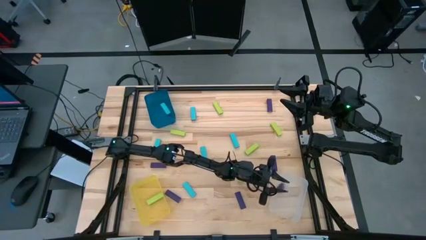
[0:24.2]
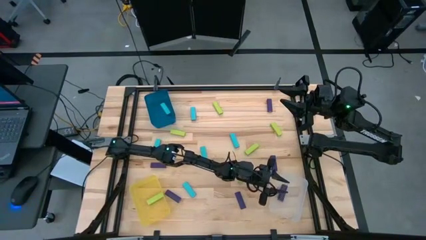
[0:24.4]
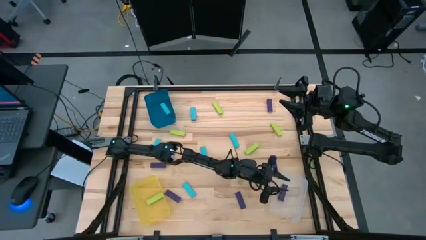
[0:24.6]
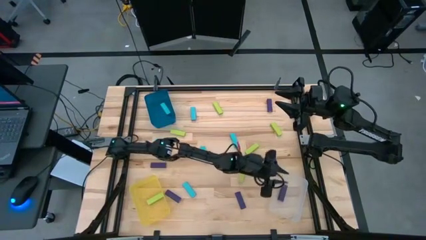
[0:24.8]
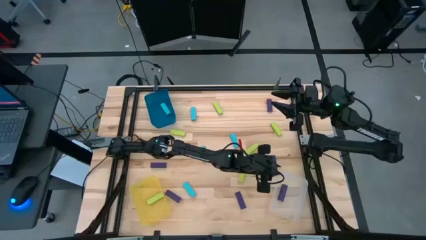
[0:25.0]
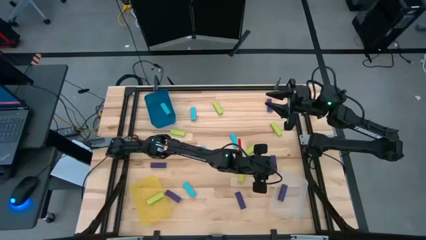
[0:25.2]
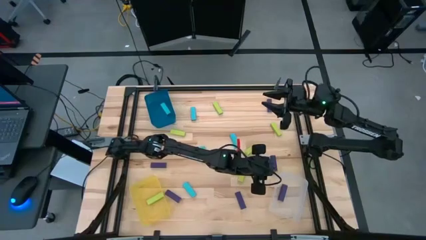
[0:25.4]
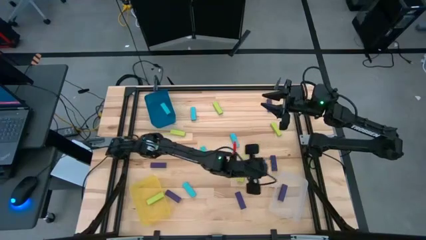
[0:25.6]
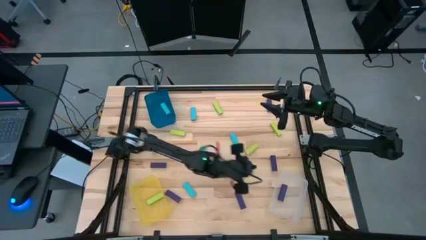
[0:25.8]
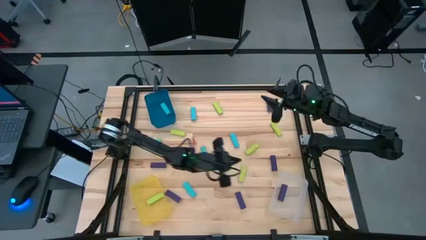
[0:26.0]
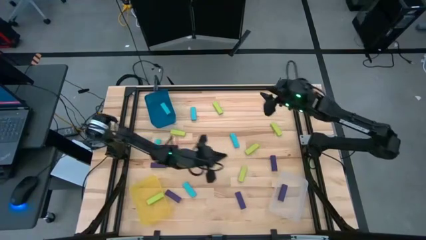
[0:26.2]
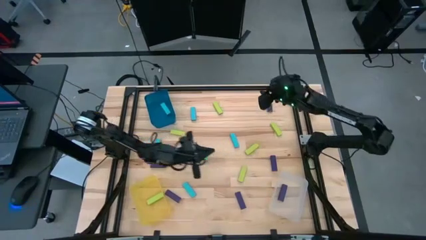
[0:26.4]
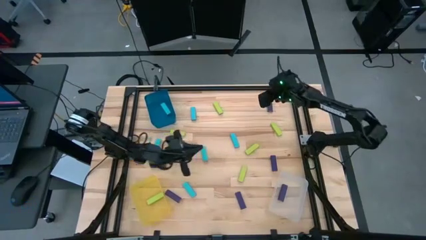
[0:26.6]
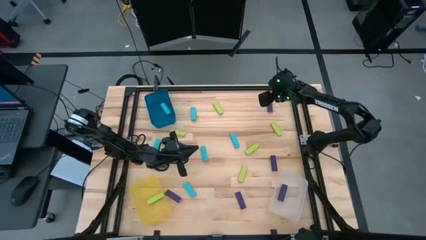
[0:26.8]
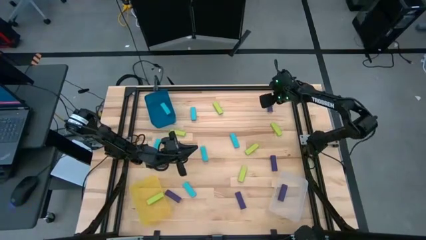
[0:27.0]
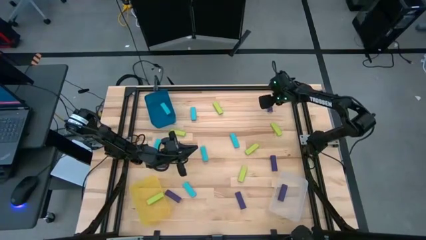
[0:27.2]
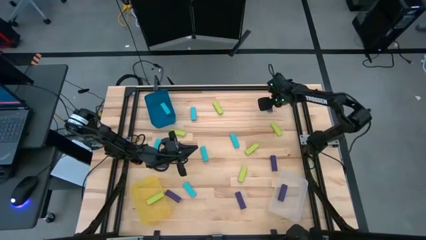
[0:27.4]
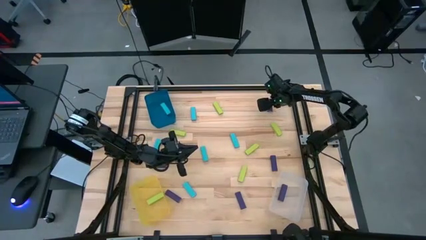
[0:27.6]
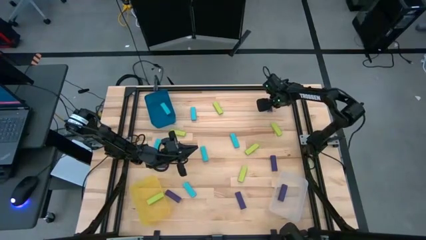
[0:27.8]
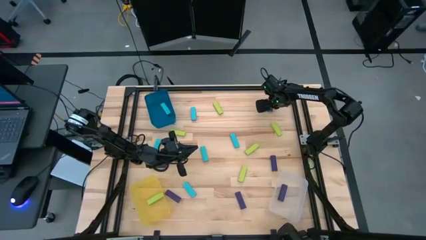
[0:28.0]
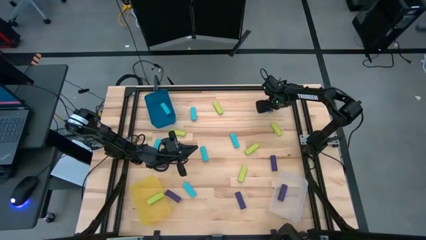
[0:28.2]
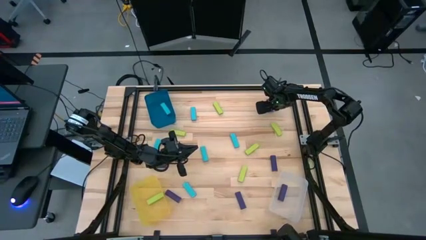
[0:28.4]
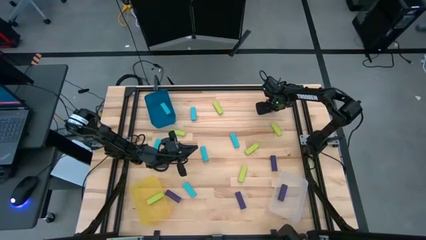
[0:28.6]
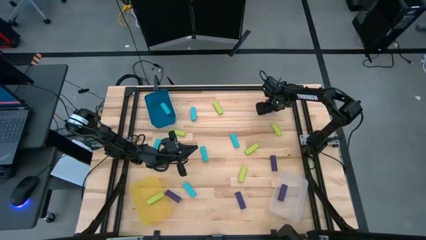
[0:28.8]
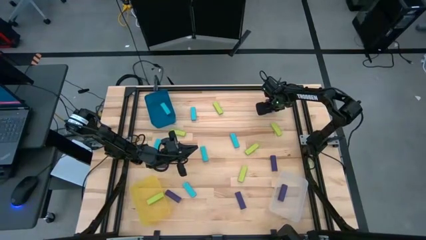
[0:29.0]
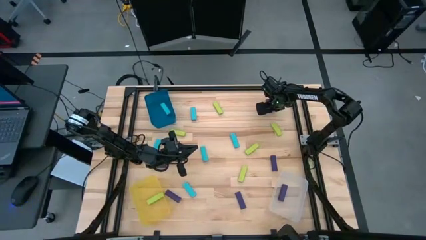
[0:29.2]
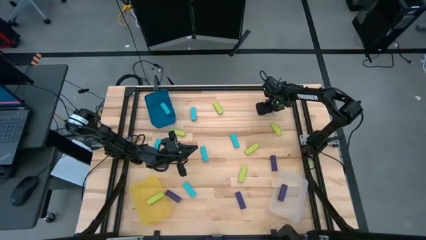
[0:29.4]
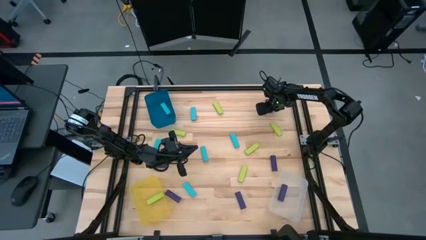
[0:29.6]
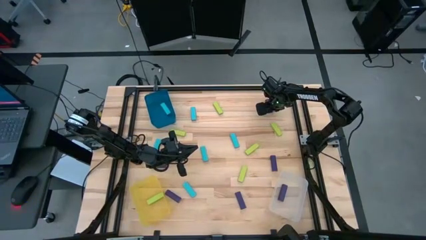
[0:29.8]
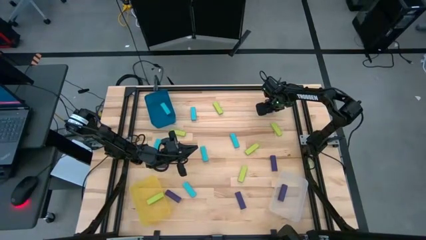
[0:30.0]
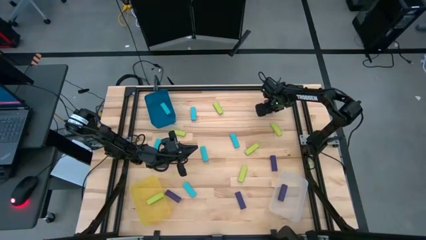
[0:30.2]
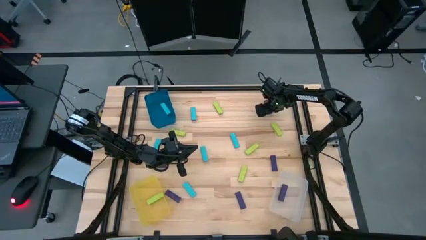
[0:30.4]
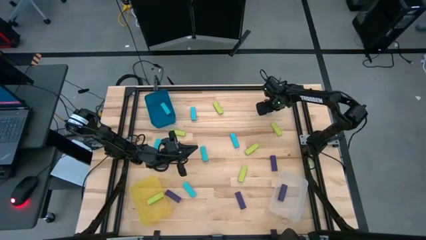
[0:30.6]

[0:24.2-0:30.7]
Task: Sort blocks
Put the purple block into the transparent bin

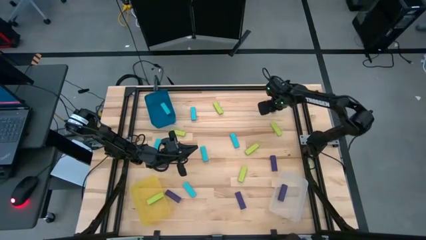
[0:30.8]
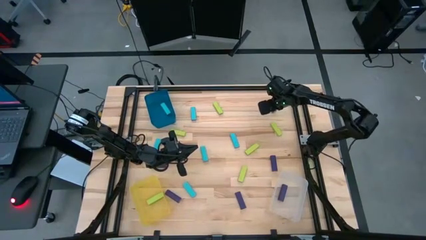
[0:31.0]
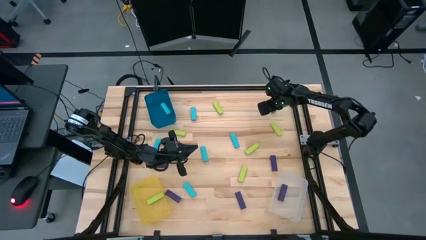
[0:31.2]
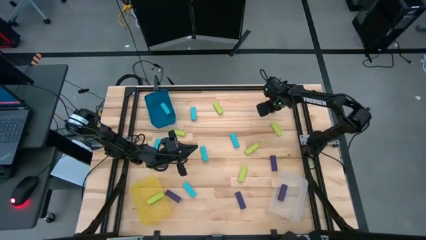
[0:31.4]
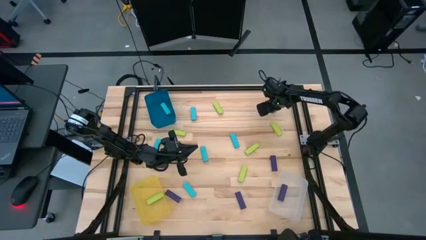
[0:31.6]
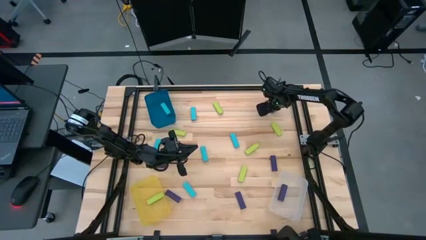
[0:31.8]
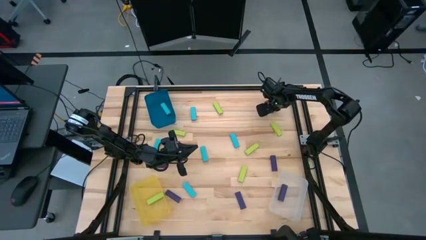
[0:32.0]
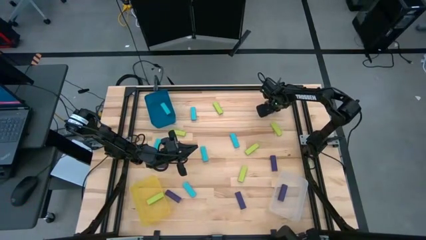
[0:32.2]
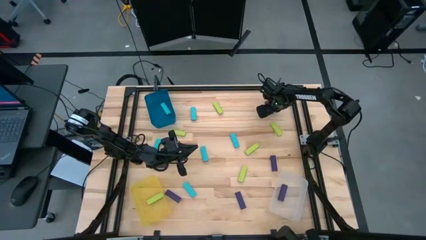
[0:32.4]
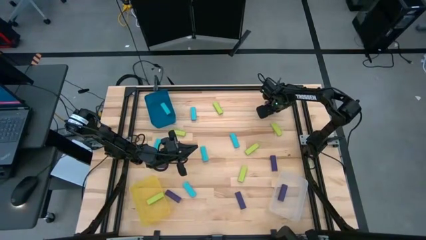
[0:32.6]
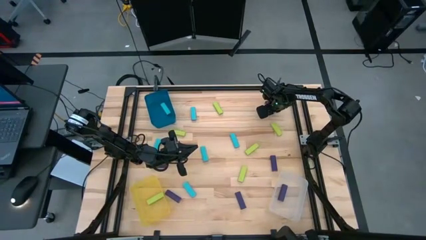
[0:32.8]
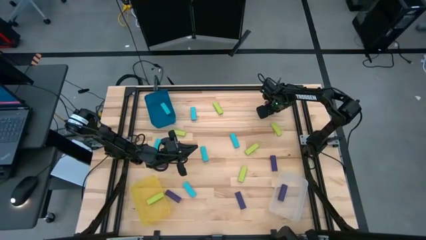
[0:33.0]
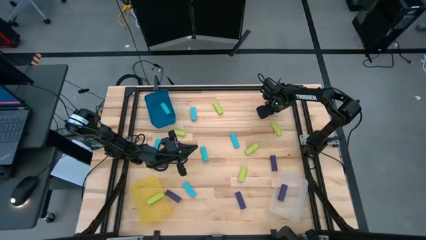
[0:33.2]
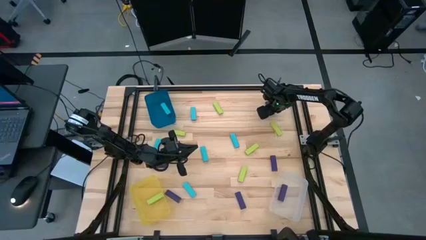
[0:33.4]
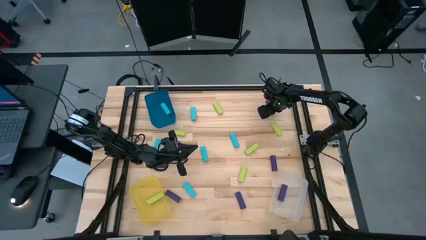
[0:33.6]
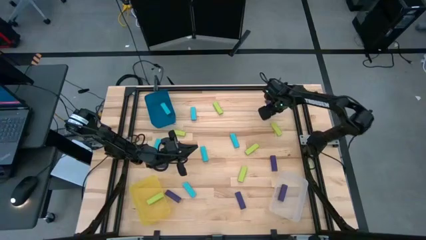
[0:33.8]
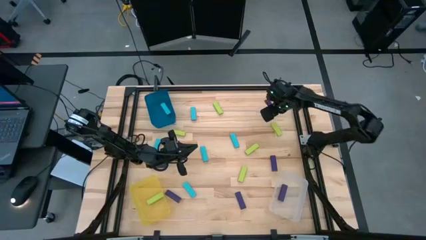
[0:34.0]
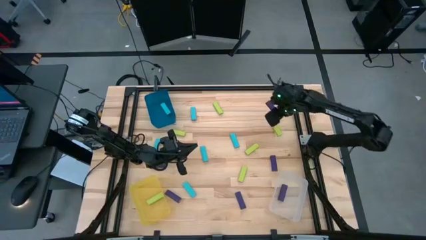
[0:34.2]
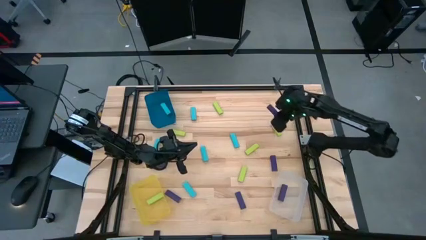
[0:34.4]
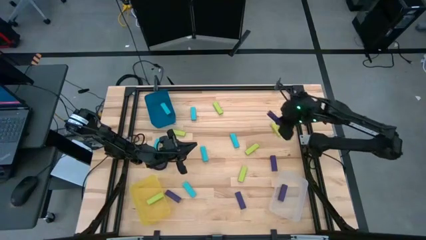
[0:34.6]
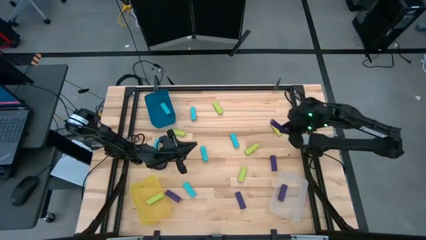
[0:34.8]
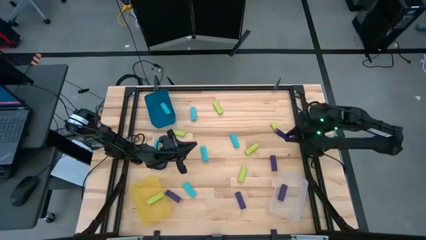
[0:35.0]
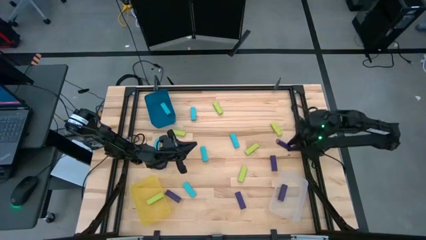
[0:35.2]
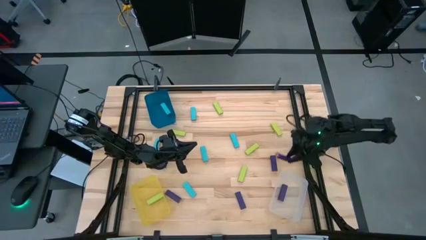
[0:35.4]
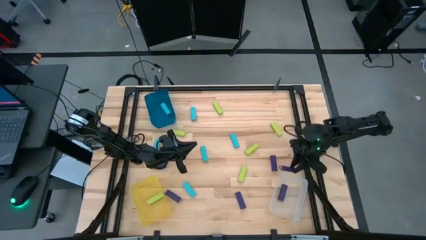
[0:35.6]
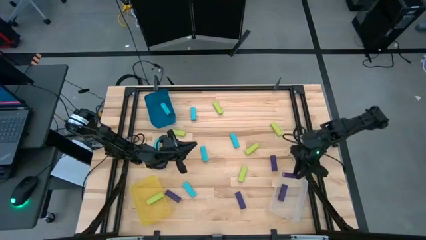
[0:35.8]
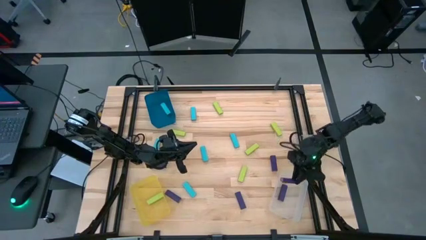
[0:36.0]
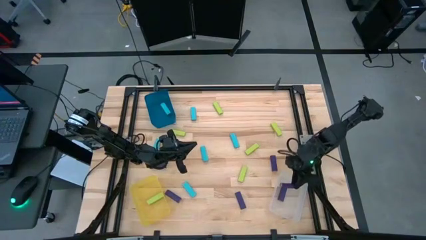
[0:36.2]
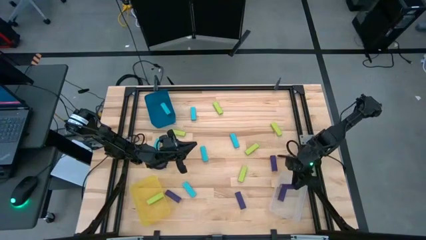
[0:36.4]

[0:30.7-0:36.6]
Put the purple block into the transparent bin

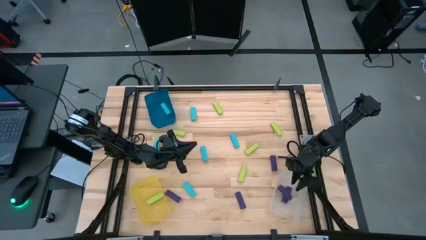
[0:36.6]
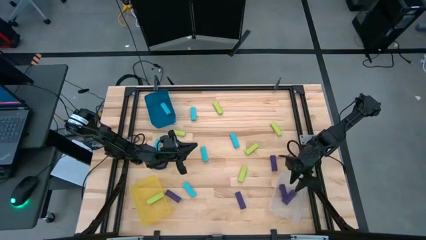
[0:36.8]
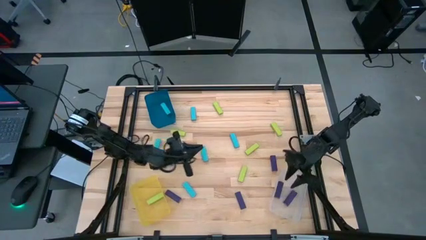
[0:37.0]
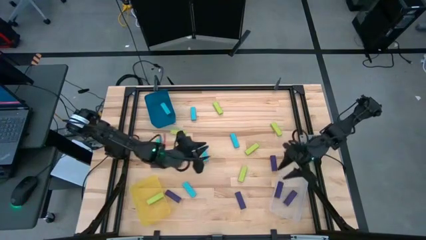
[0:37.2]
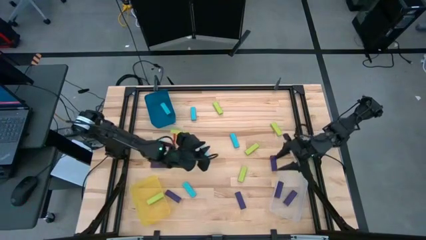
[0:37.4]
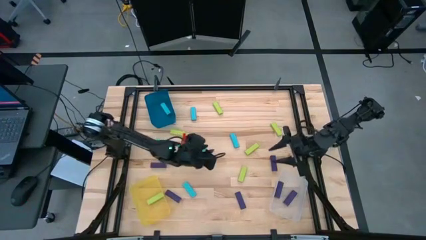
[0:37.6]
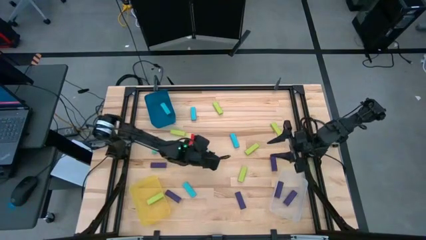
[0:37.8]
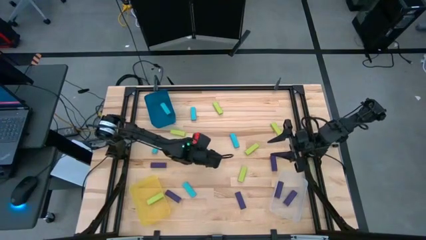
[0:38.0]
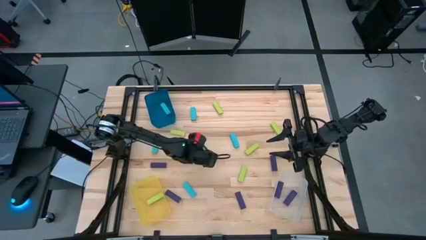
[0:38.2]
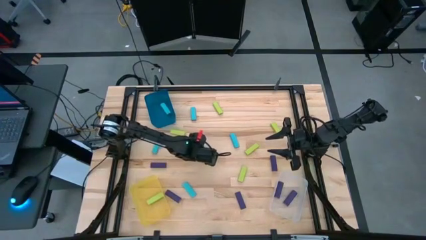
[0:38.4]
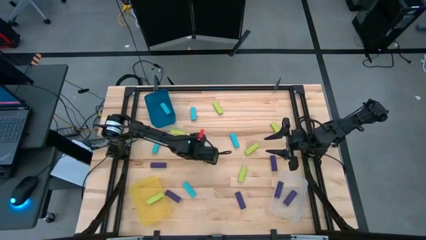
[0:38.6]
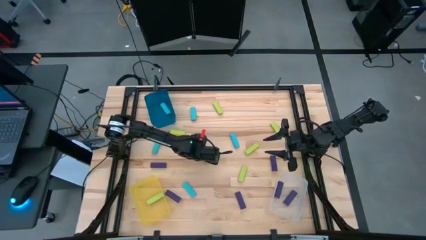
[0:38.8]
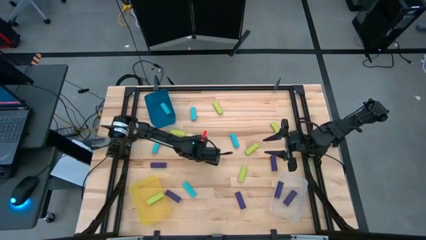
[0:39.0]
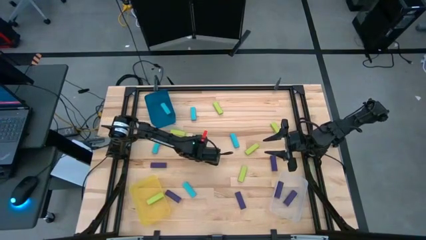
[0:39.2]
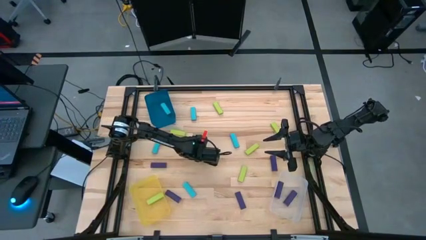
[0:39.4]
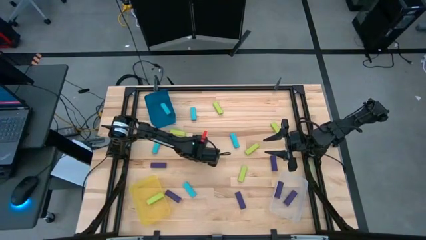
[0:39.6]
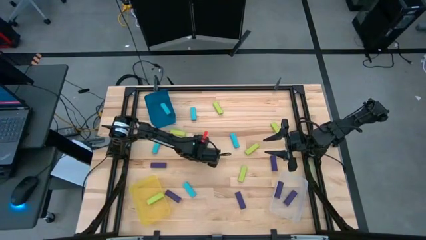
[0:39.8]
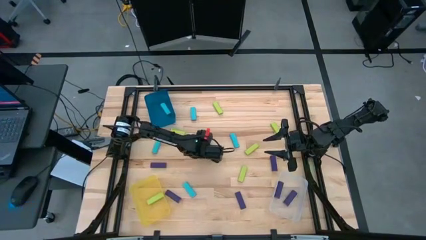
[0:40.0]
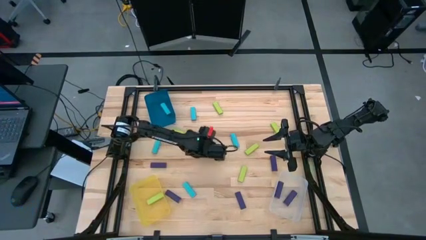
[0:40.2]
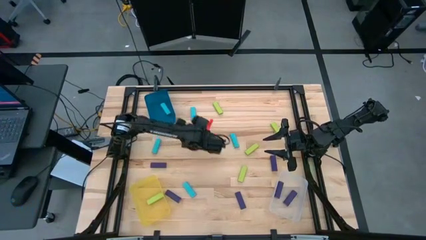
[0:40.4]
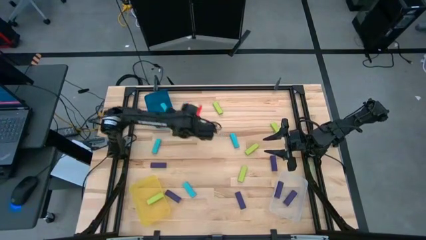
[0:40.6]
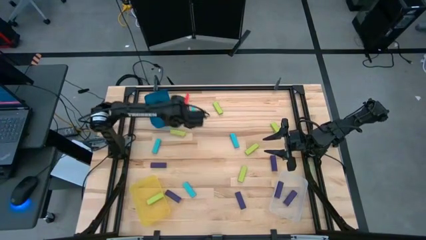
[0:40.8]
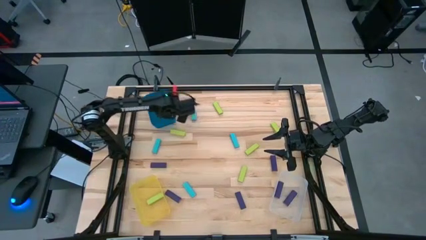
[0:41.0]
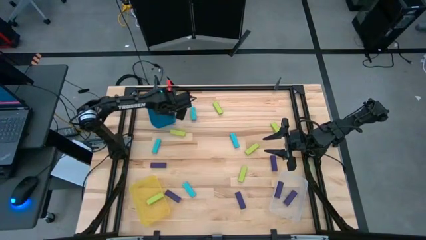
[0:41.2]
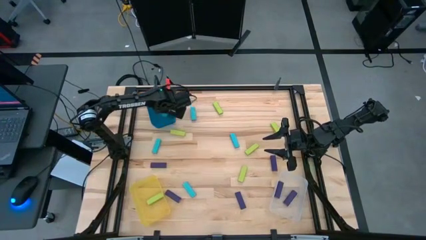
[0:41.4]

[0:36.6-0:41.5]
Put the blue block into the blue bin
